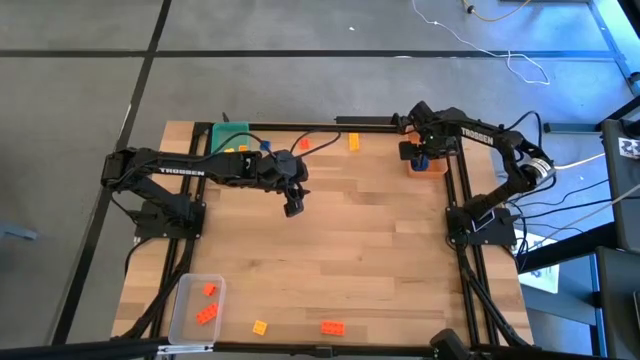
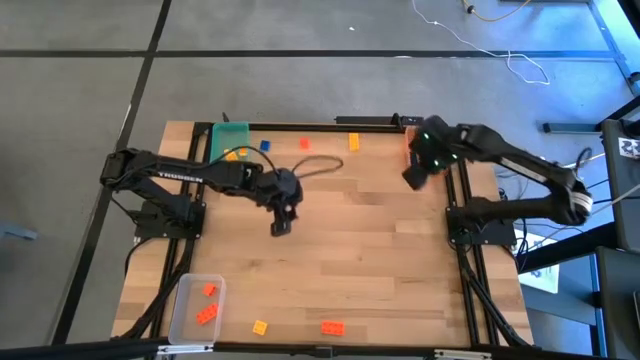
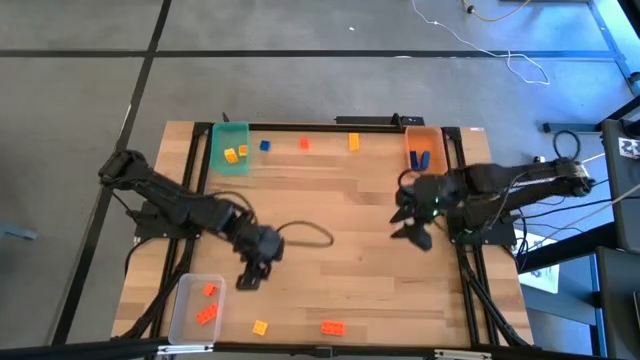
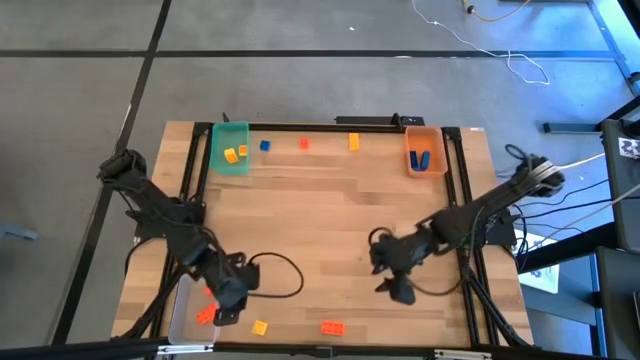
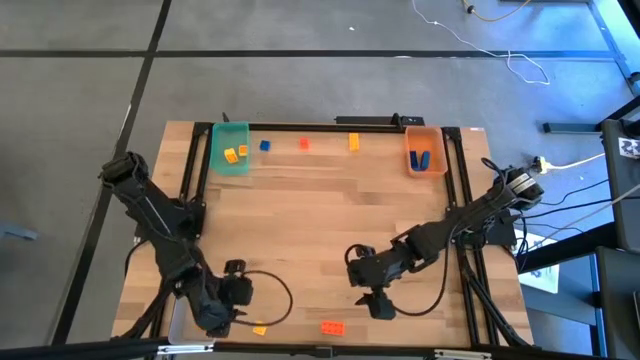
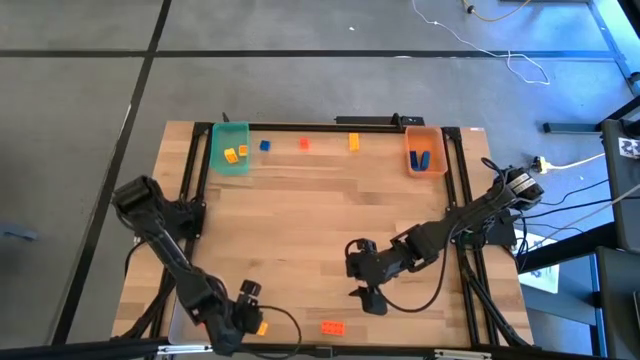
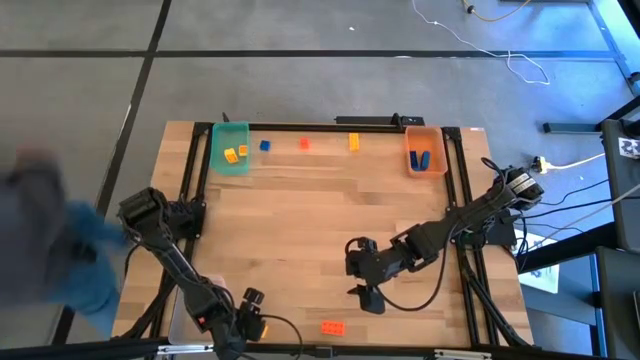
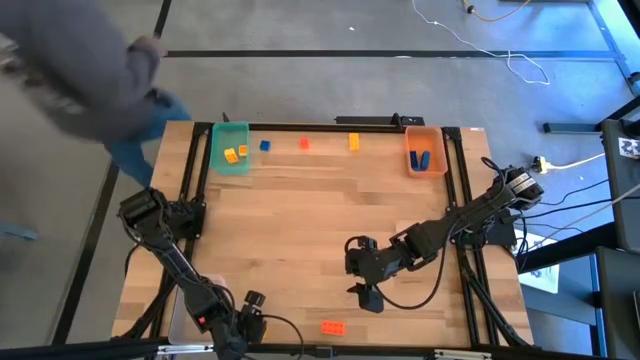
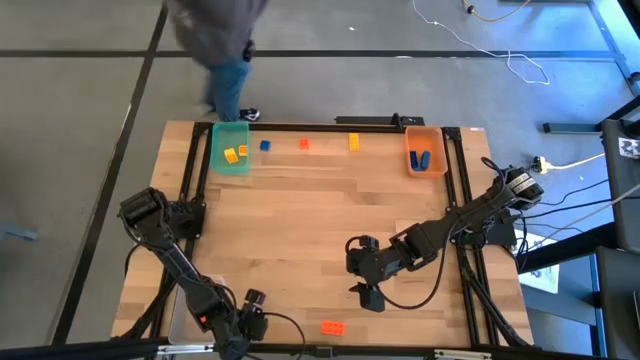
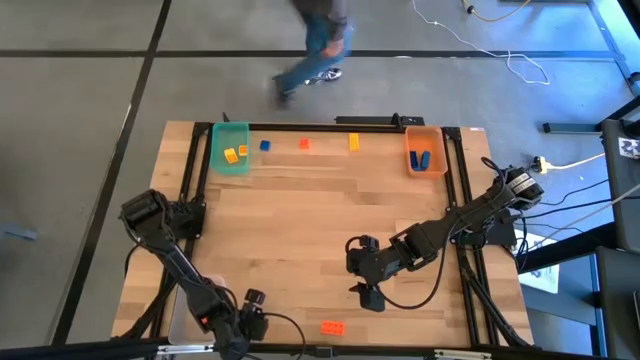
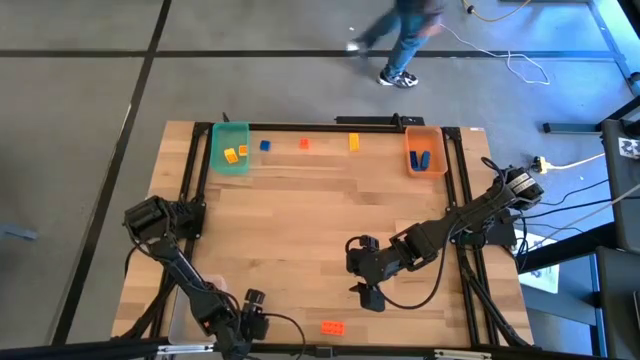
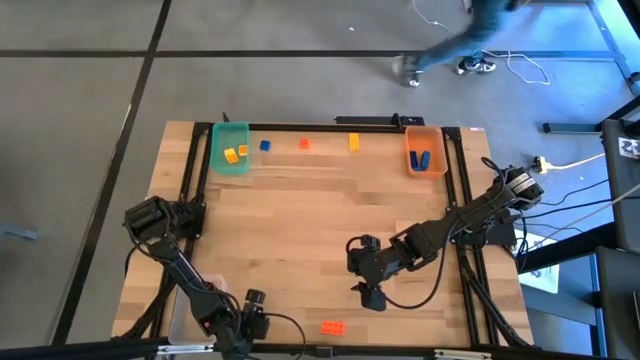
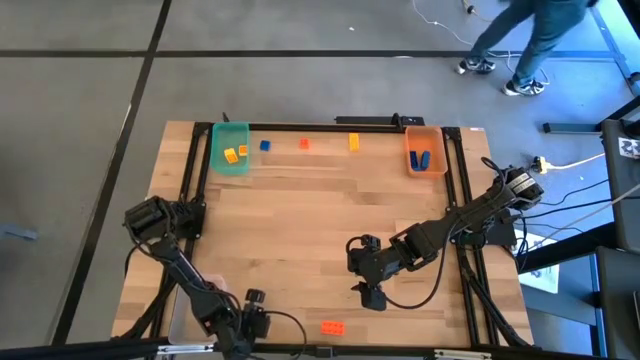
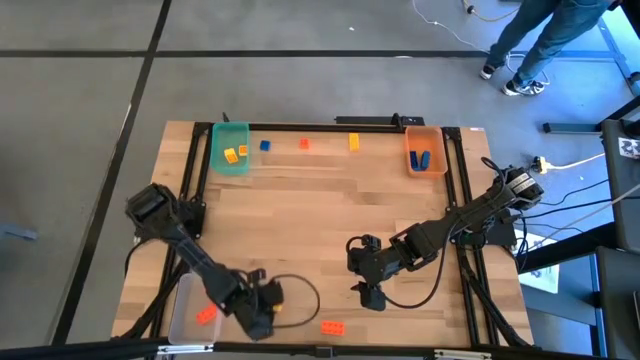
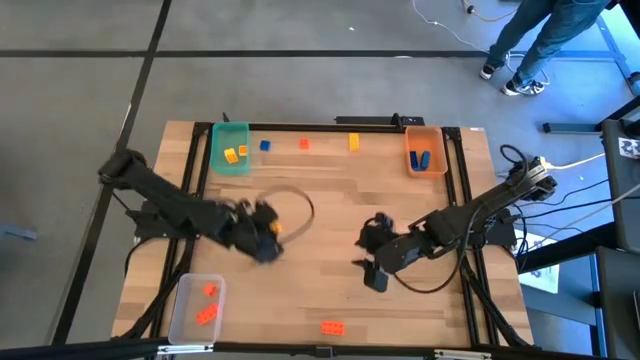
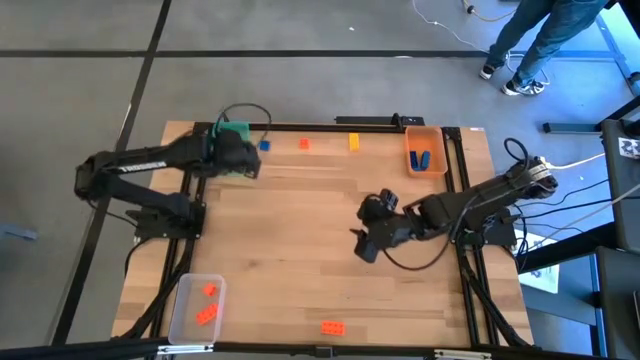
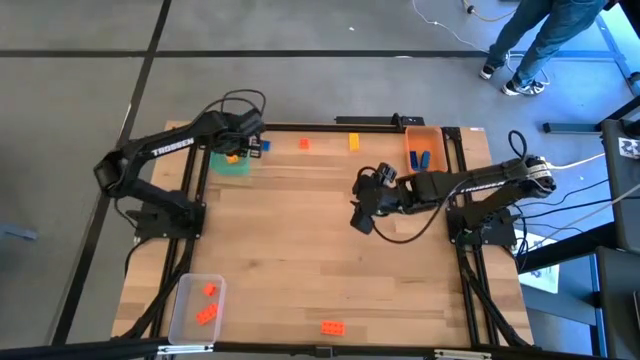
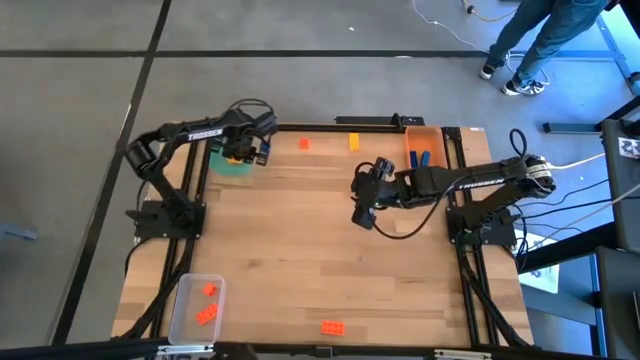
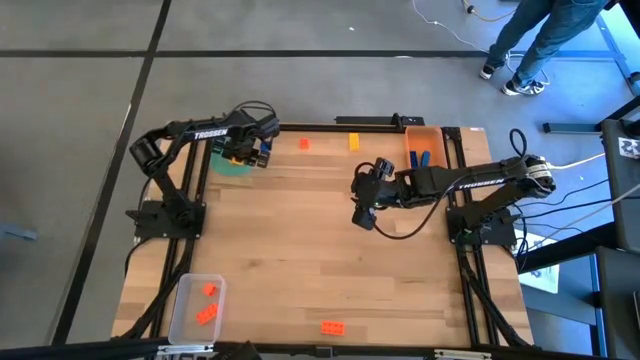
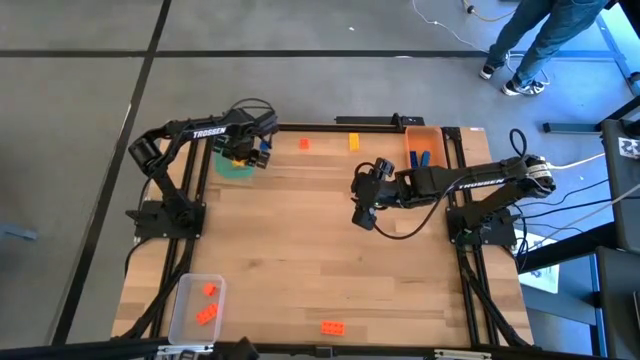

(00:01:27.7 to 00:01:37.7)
Task: Sort & place blocks by color
Put the yellow game piece into the green bin

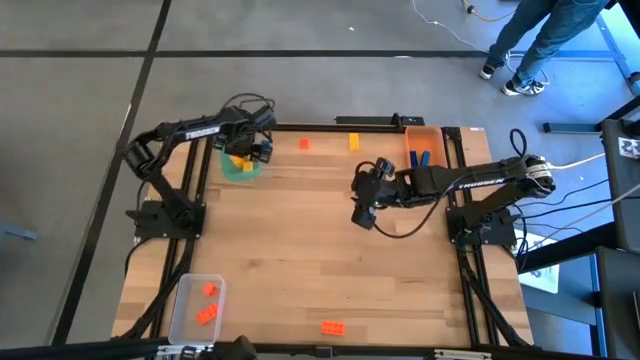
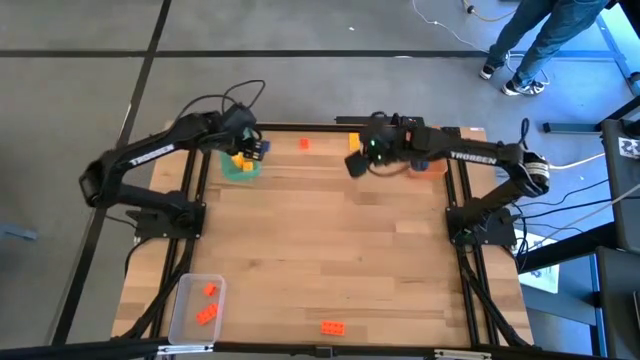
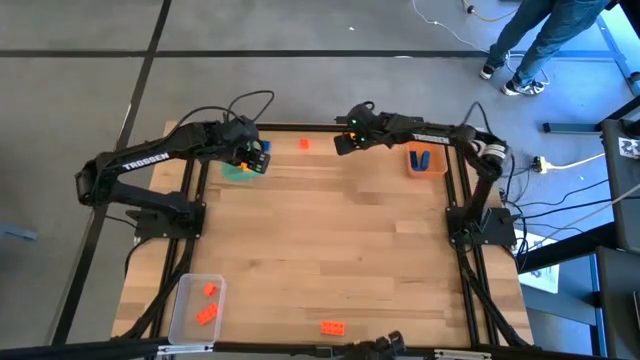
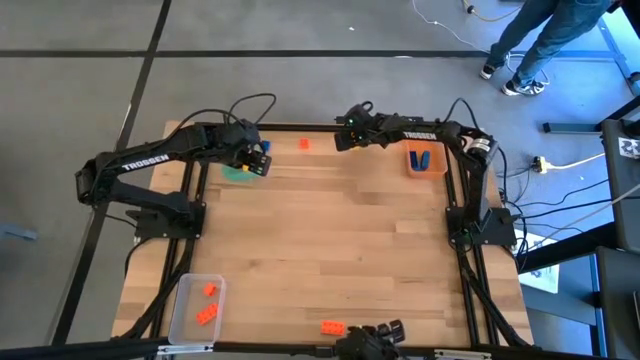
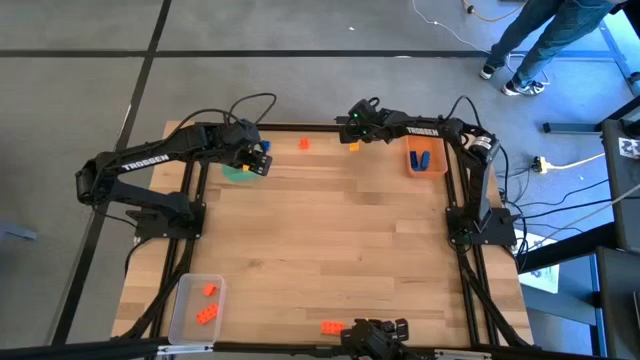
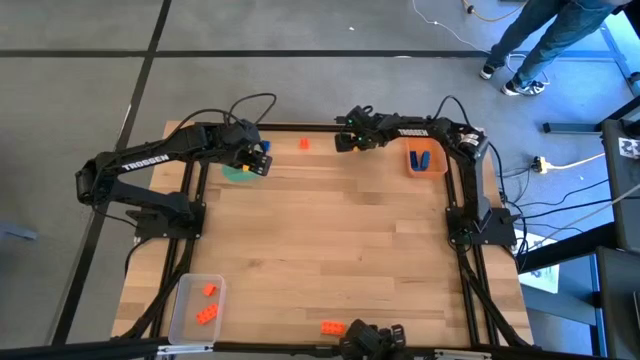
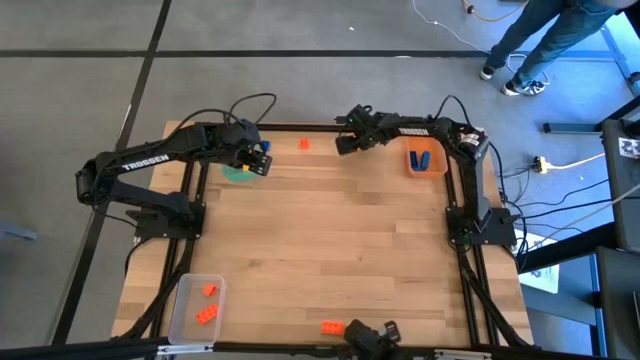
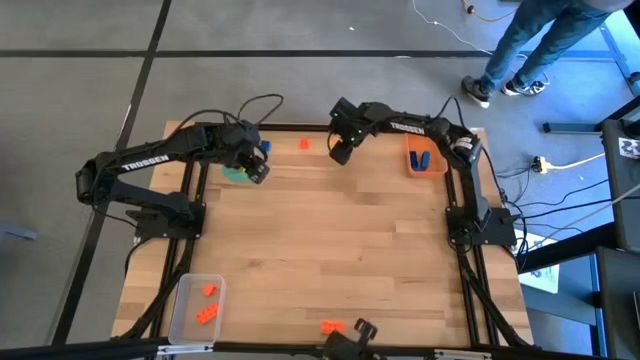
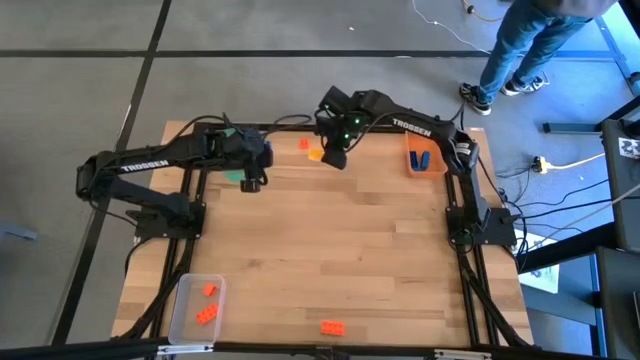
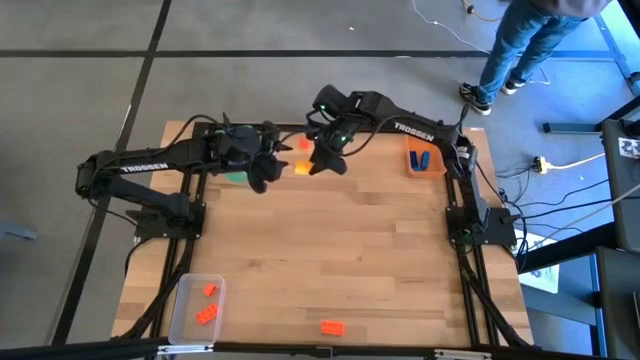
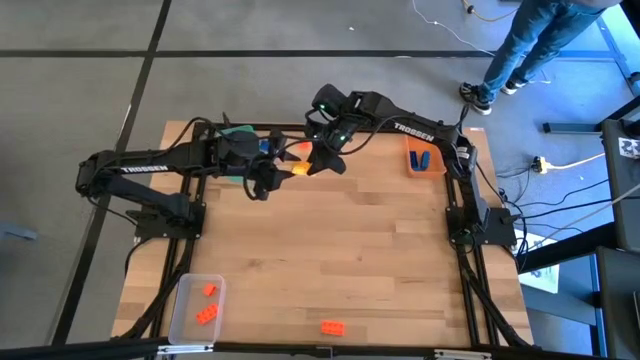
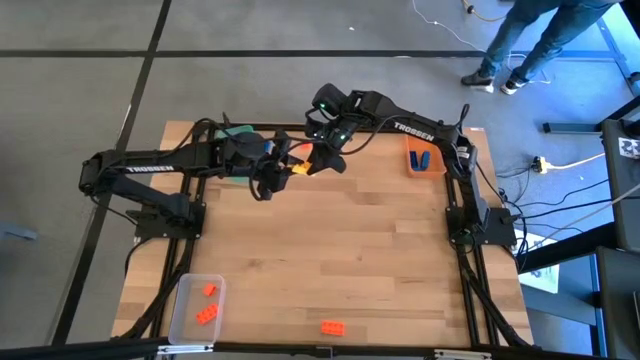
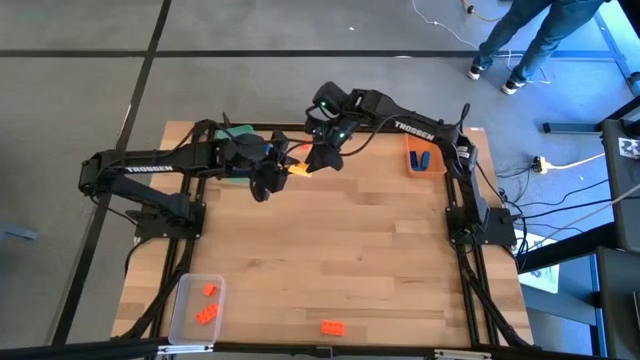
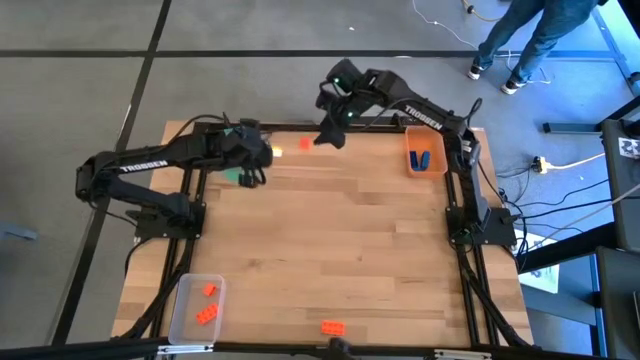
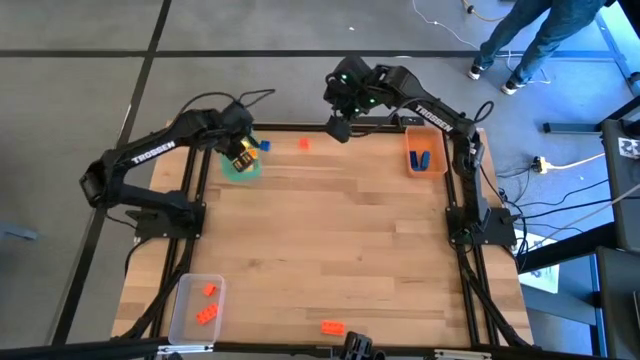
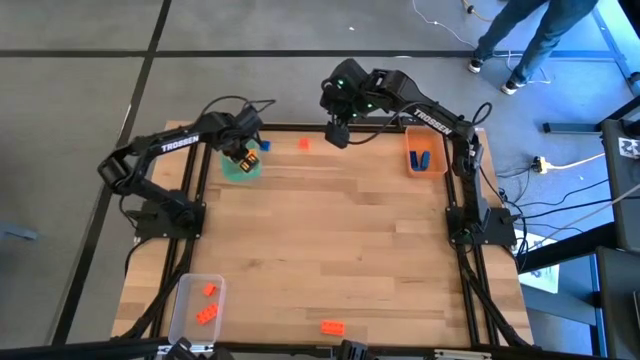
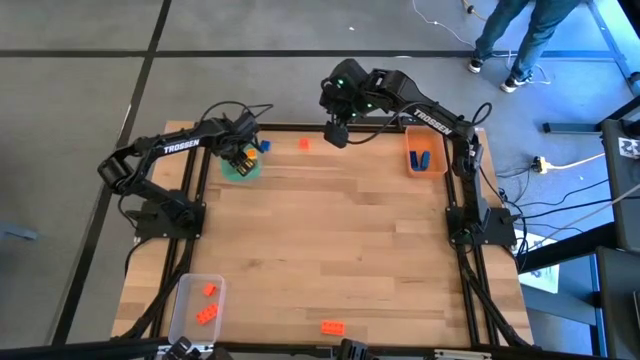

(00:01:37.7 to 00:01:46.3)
Put the yellow game piece into the green bin

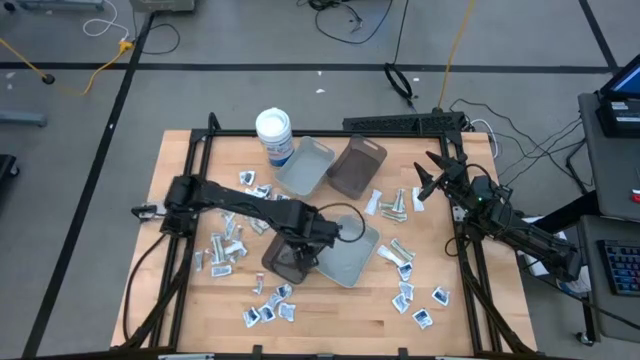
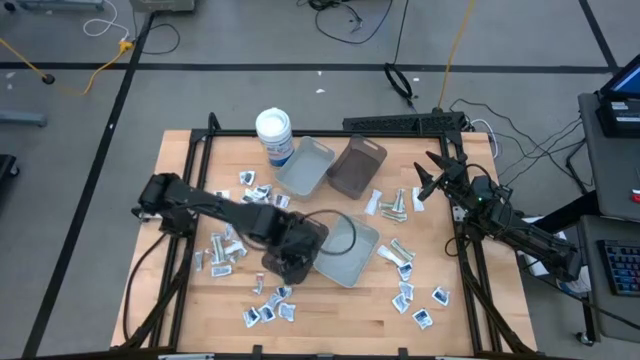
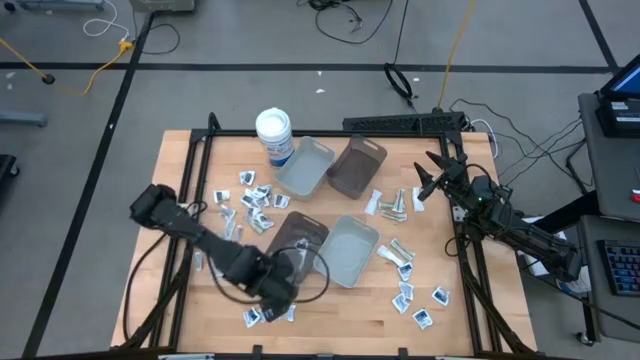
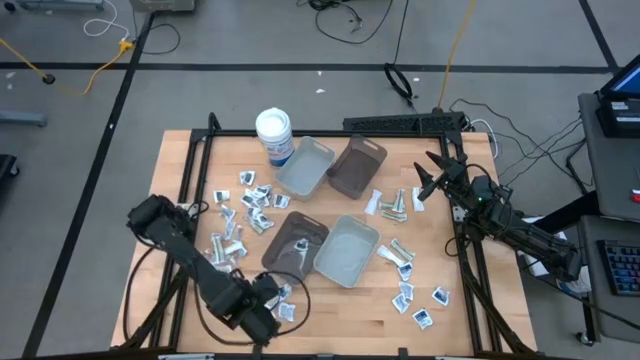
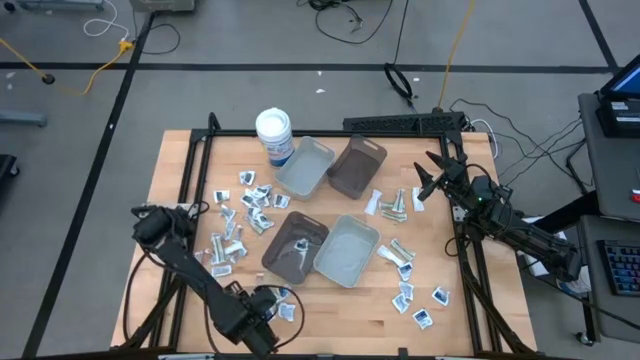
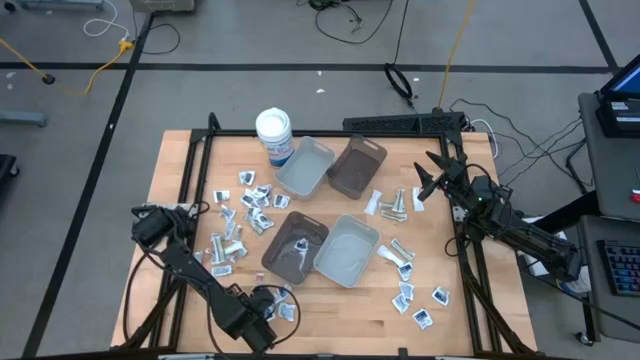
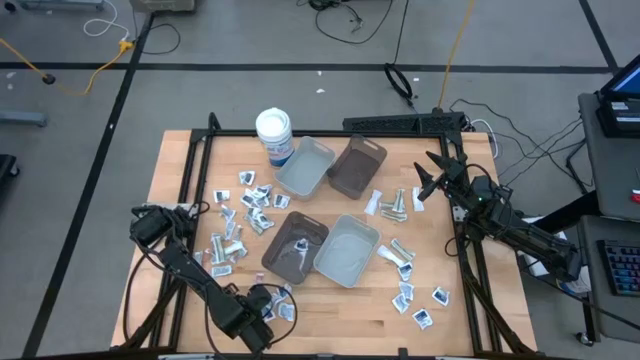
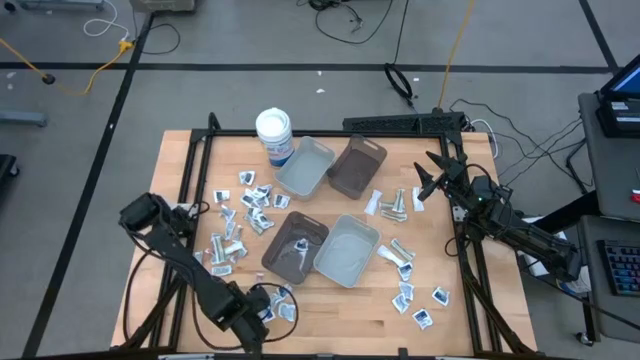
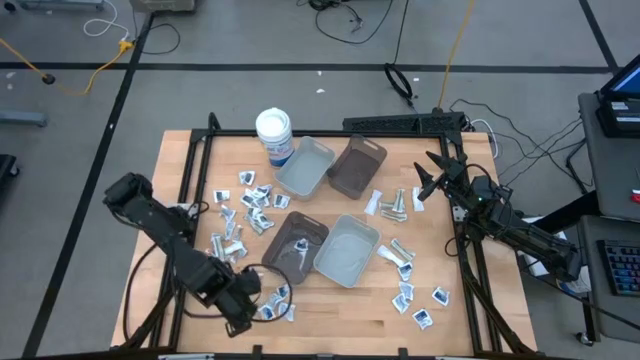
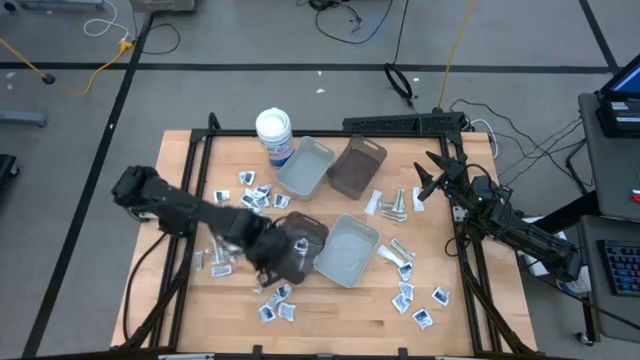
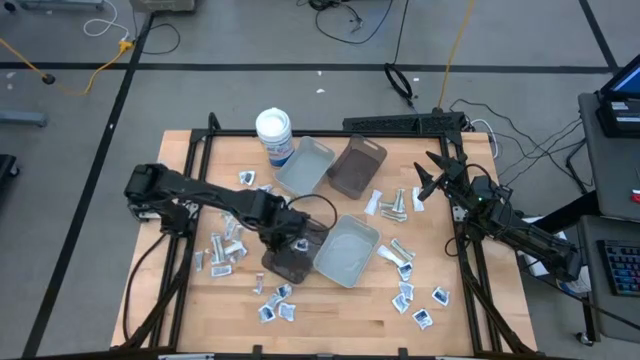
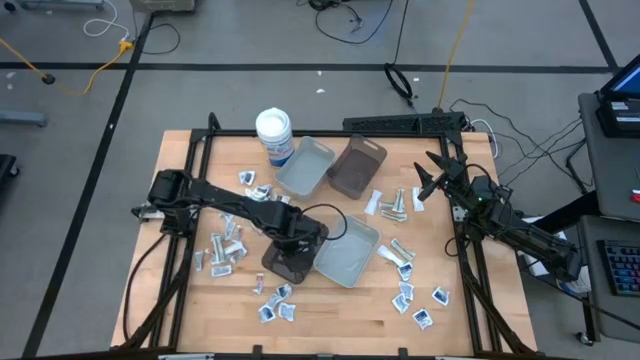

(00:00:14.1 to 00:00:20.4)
Task: Pick & Place First Aid Supplies
Put the blue alcohol pad into the bottom black bin
